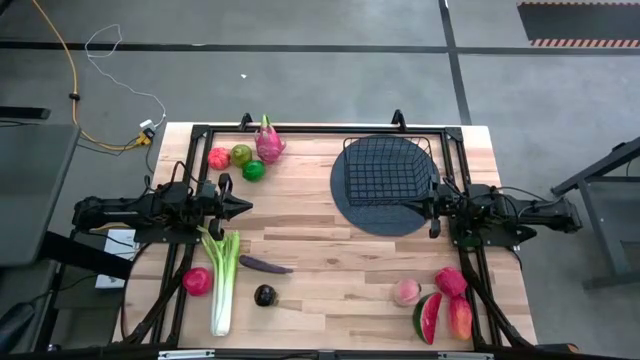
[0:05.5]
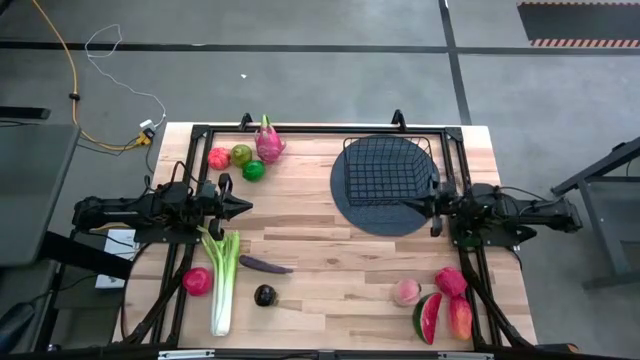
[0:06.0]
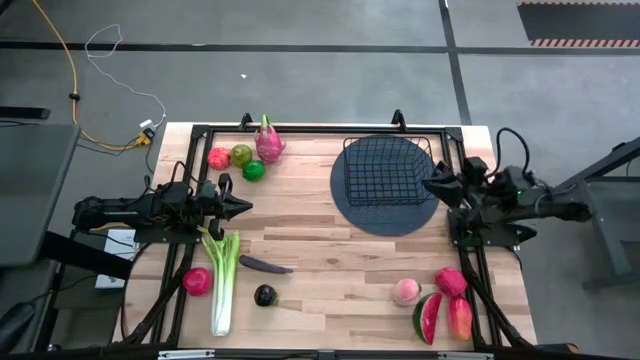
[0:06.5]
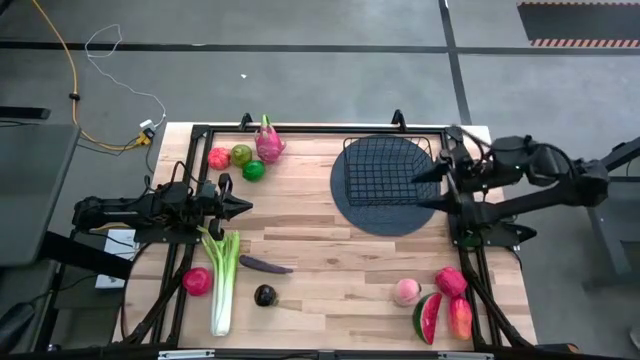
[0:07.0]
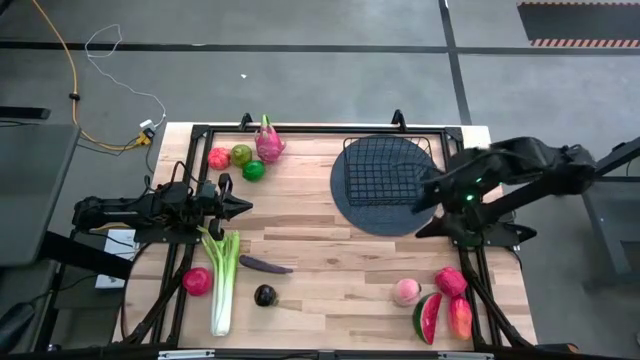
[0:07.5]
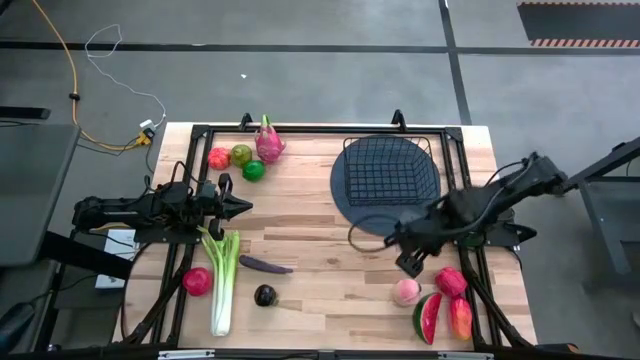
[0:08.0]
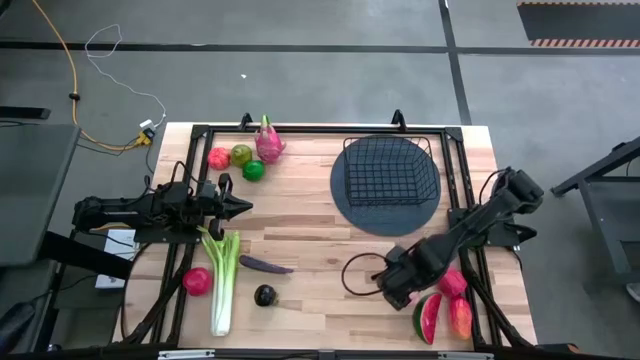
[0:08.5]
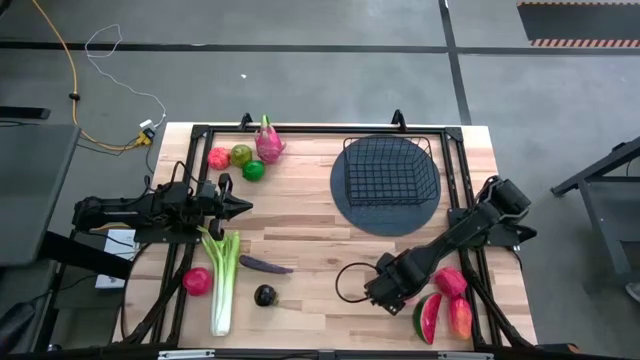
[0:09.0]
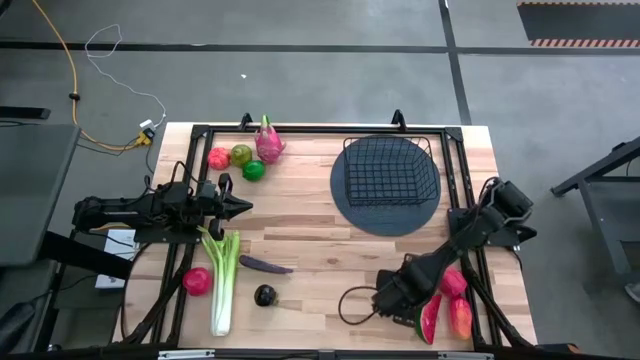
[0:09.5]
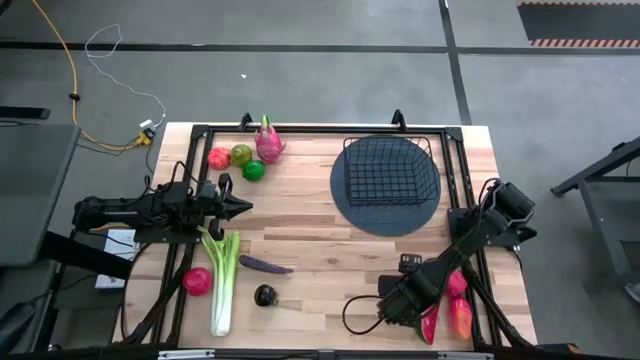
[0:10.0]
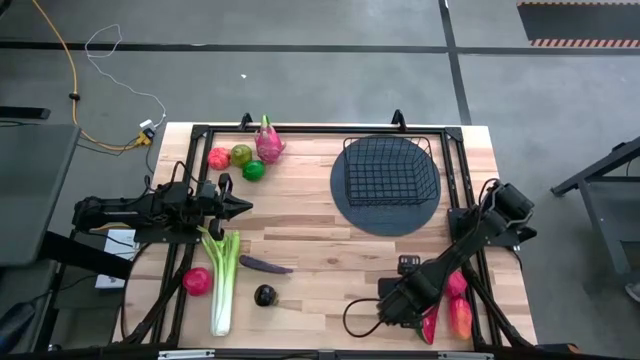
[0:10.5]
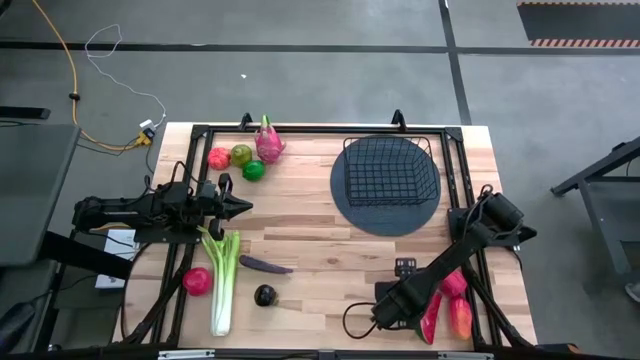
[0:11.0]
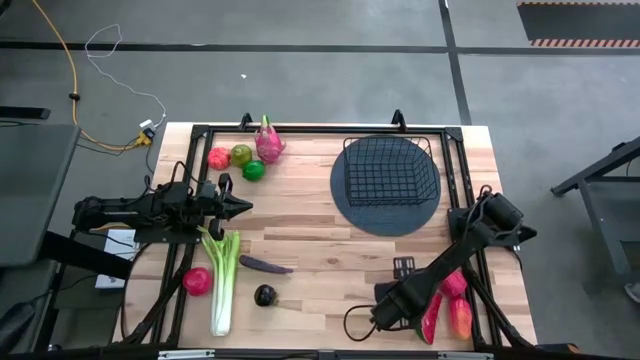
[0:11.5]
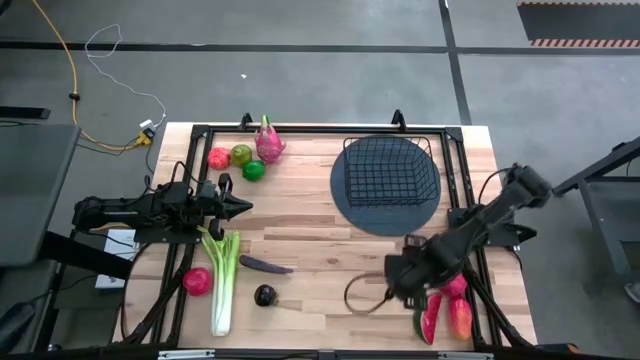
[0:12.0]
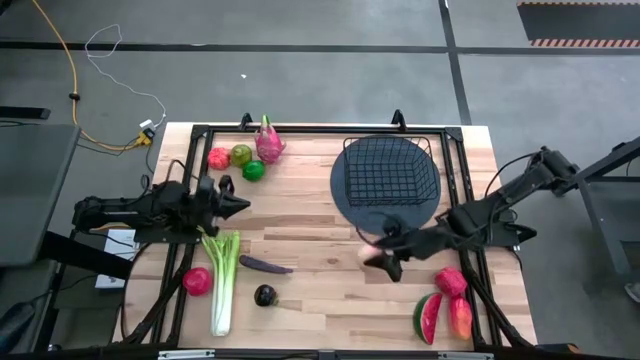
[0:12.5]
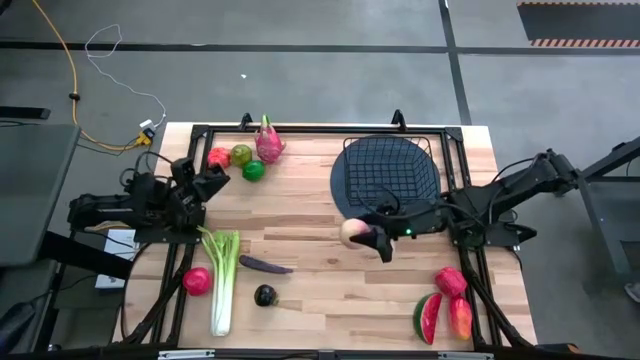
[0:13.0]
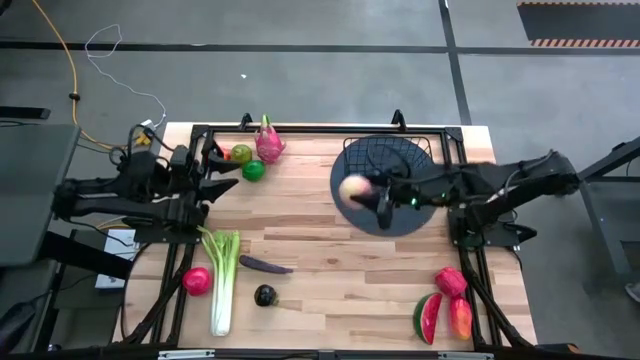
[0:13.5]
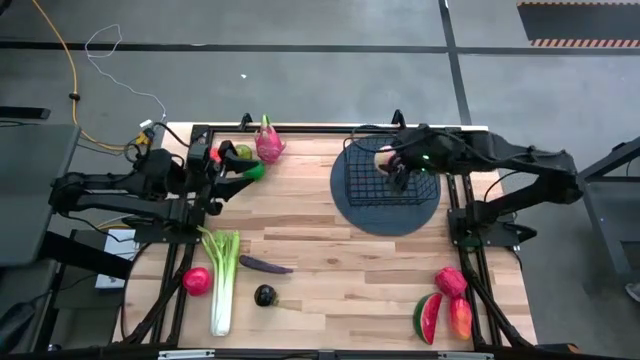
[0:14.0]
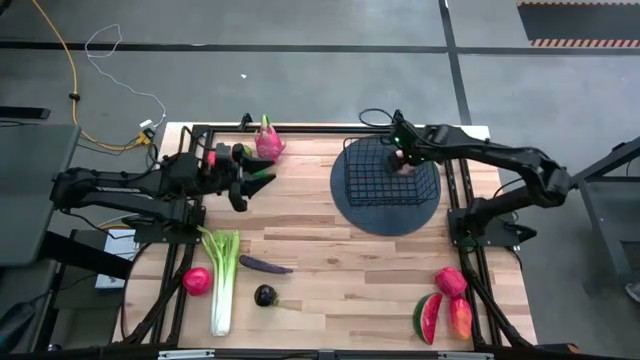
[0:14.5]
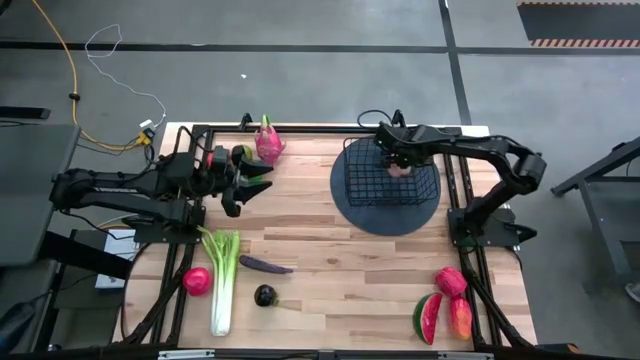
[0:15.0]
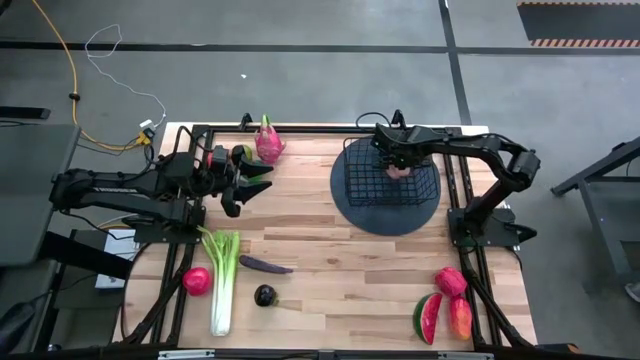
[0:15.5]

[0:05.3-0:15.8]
Task: Build produce basket
Put the peach into the wire basket

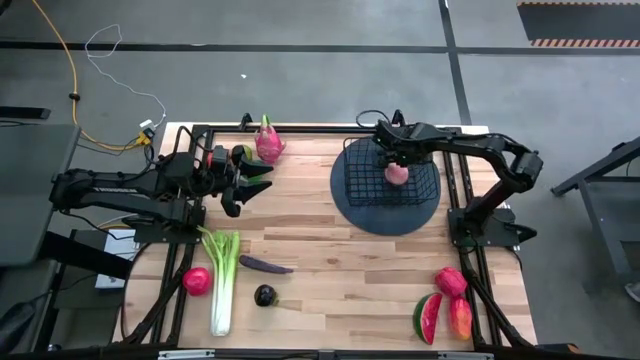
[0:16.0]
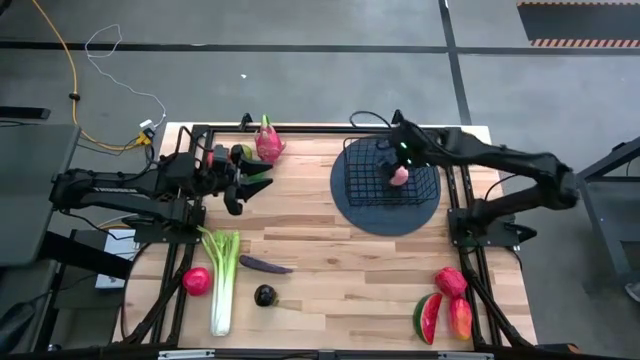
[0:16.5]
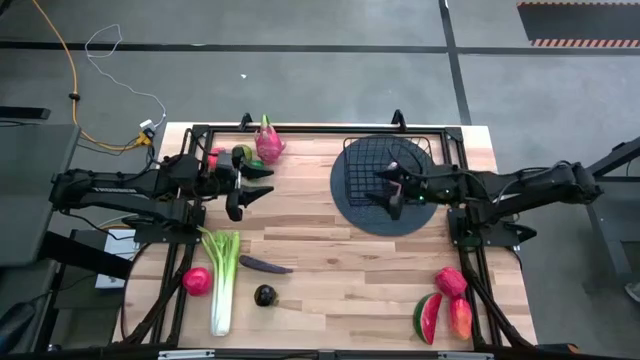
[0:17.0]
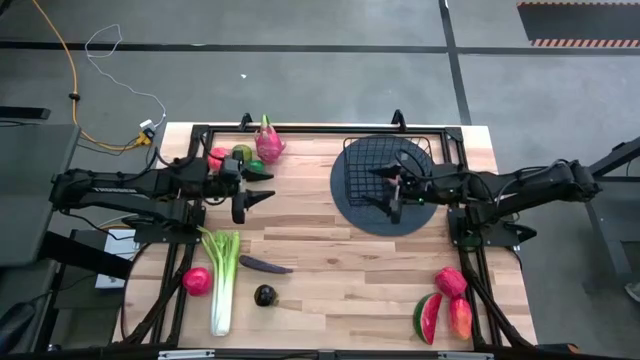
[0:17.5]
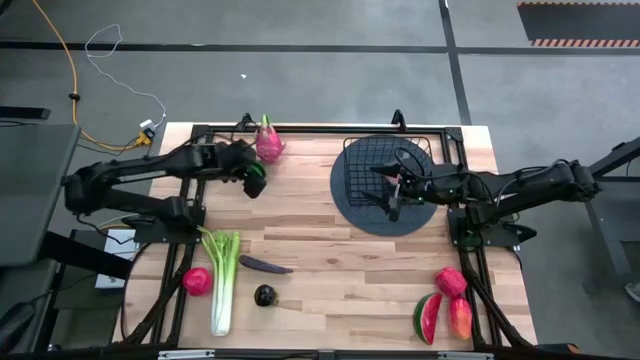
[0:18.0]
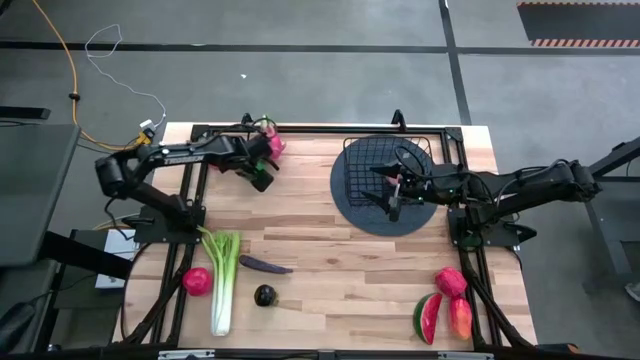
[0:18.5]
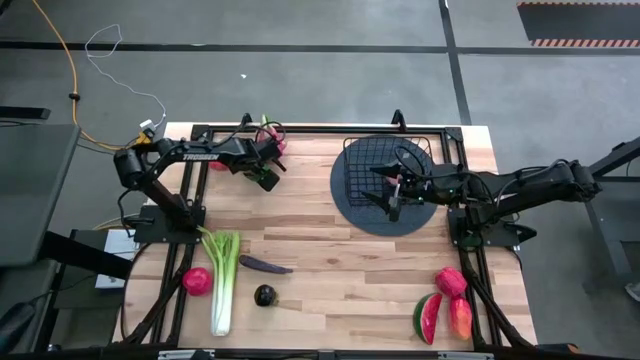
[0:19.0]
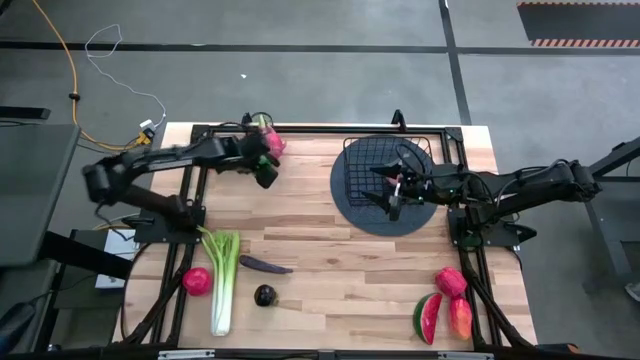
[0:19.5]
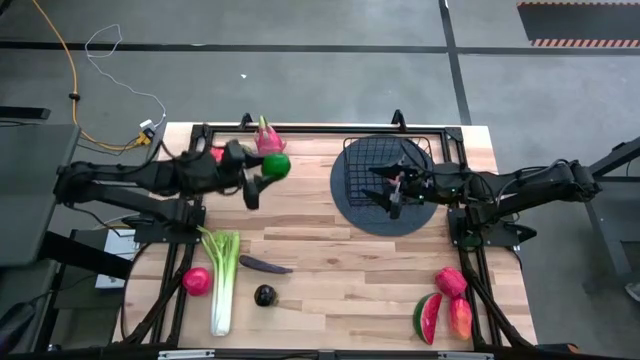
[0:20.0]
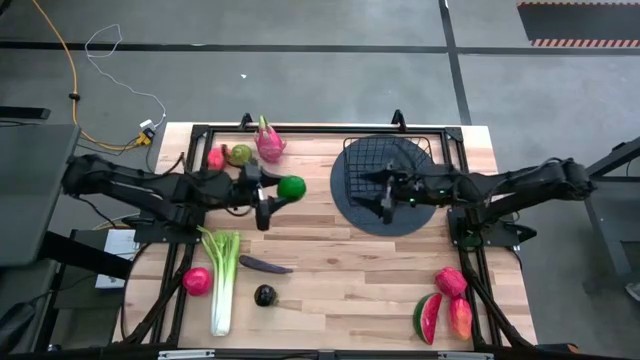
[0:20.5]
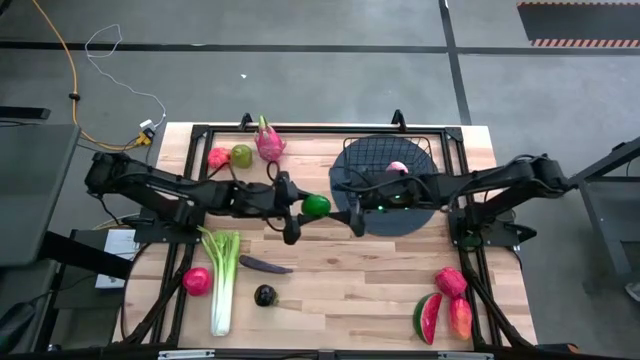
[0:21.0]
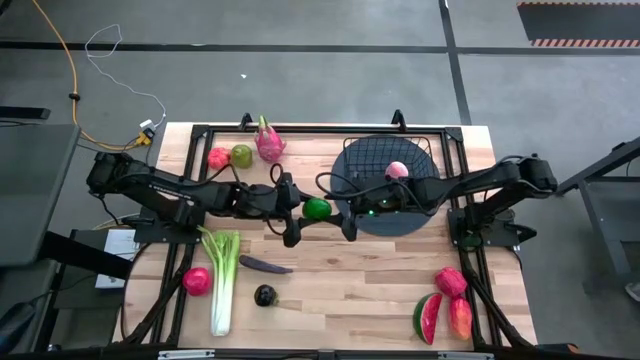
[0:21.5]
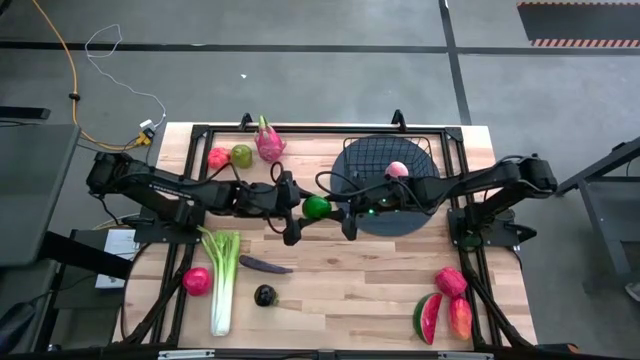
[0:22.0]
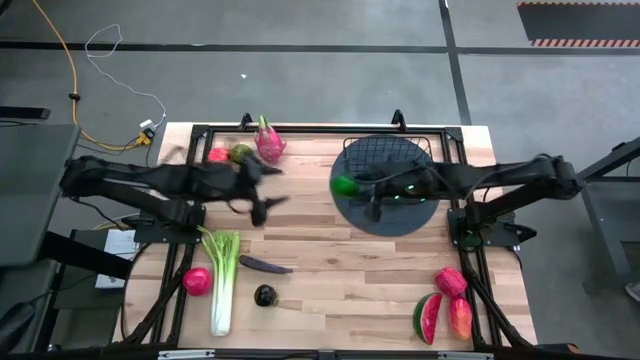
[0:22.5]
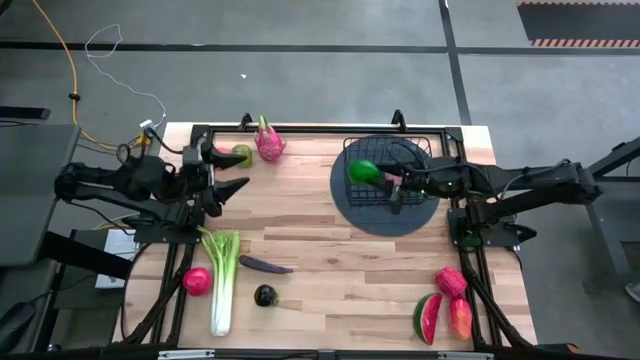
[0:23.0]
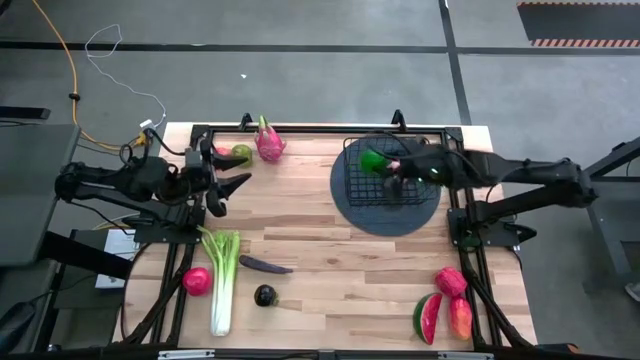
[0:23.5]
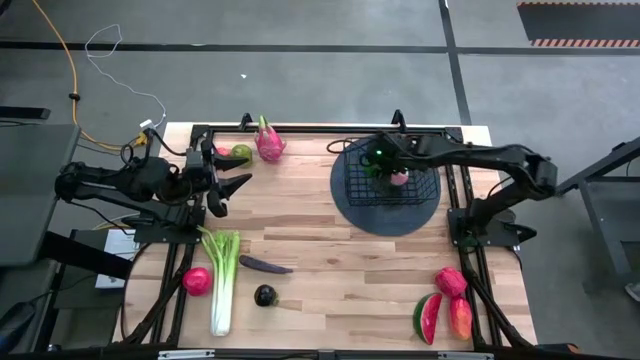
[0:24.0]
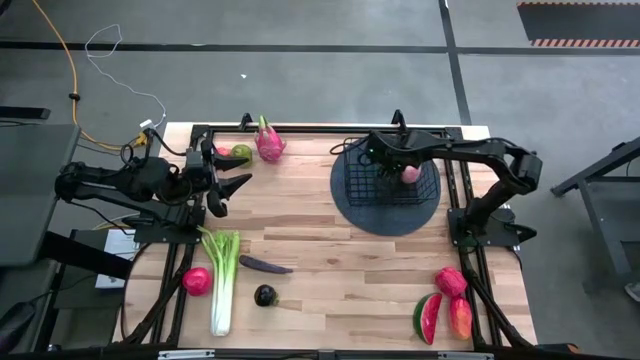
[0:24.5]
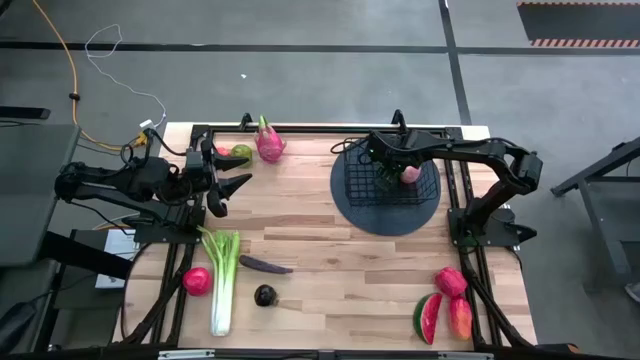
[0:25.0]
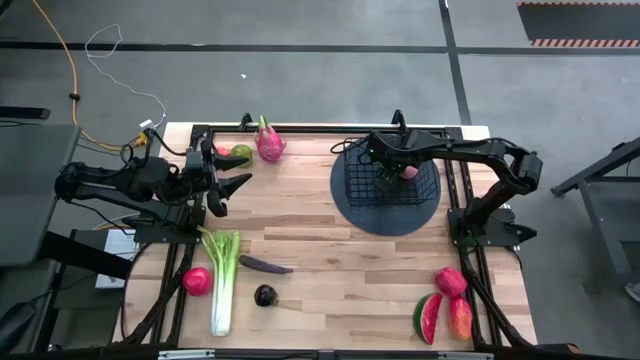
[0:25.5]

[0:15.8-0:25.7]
Put the lime into the wire basket

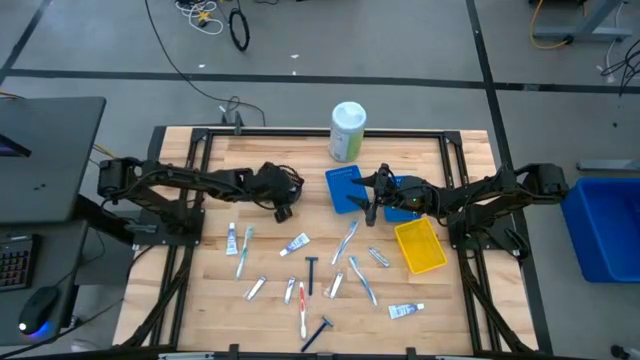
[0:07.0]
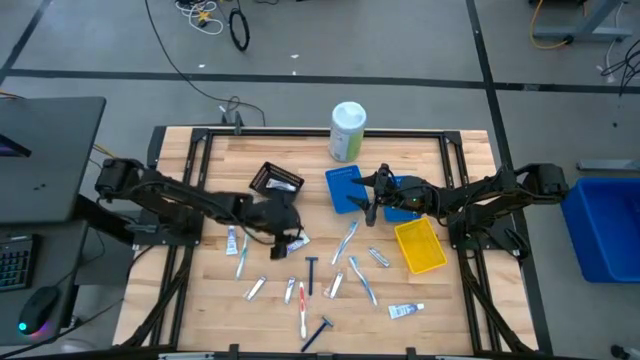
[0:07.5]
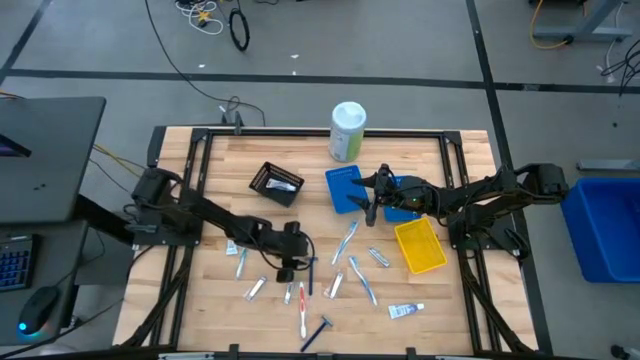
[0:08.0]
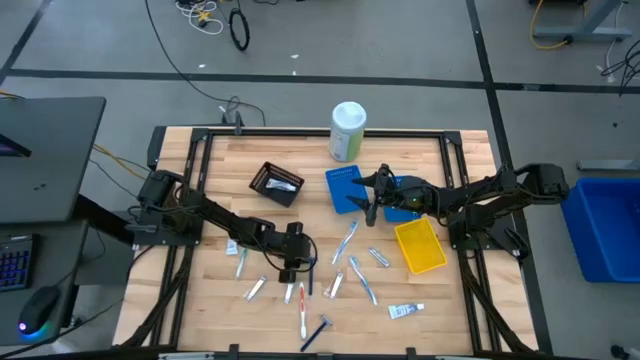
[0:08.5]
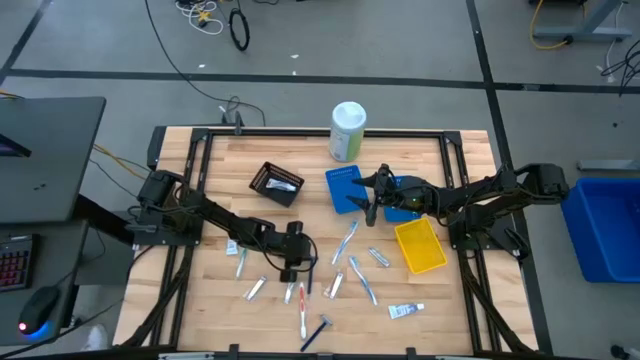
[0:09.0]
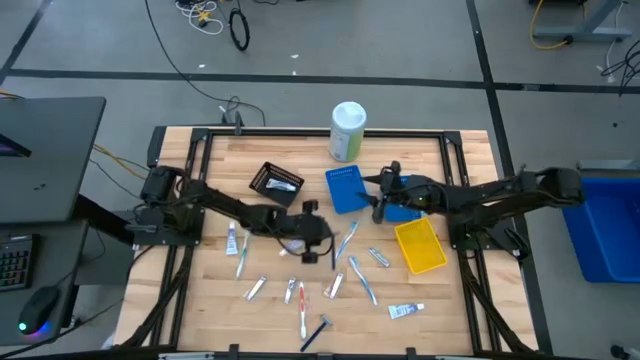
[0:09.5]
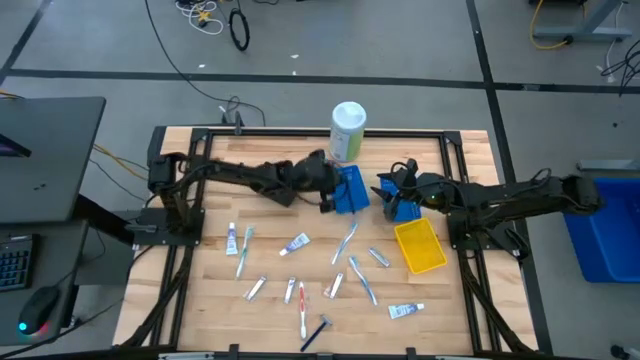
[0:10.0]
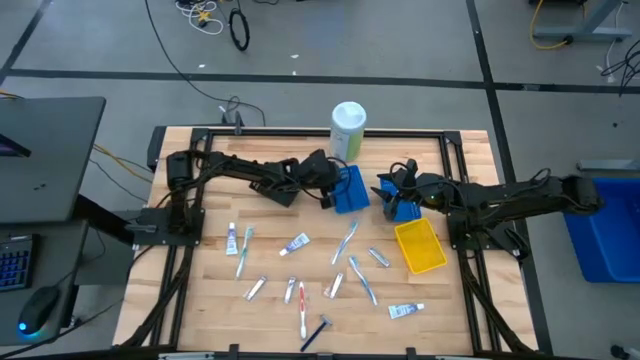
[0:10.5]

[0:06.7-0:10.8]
Task: Pick & Place Travel size toiletries
Put the razor into the left blue basket
